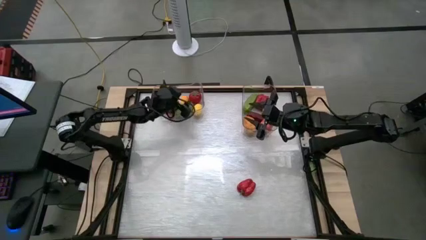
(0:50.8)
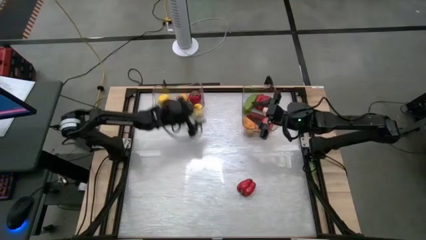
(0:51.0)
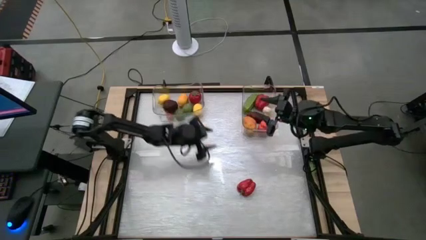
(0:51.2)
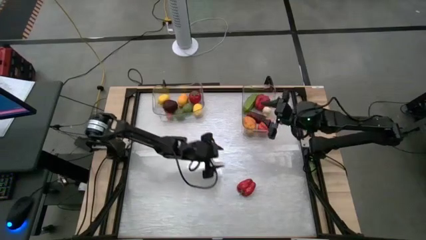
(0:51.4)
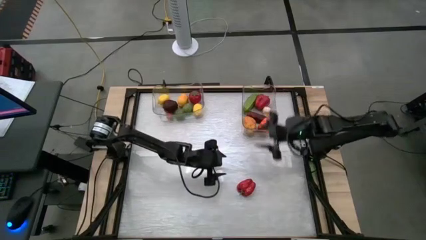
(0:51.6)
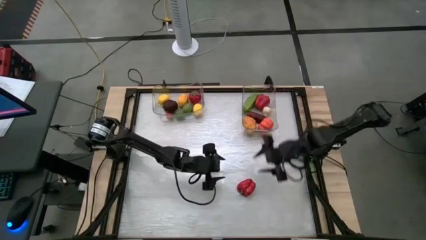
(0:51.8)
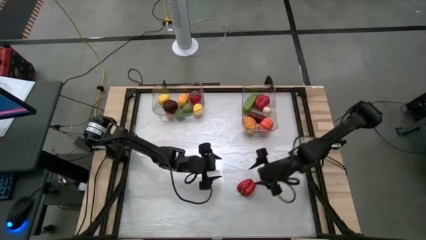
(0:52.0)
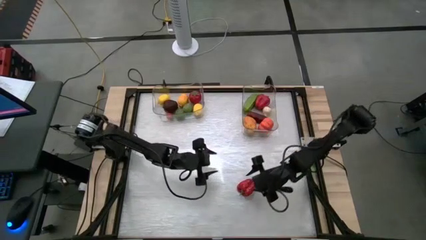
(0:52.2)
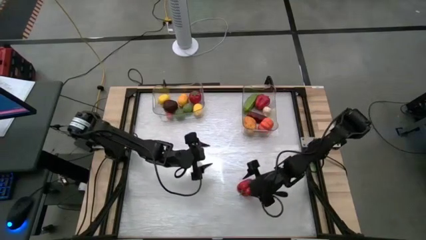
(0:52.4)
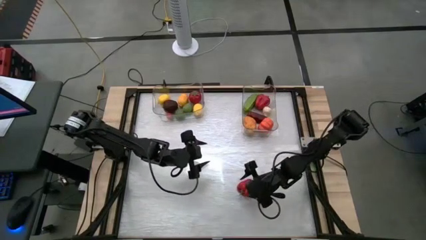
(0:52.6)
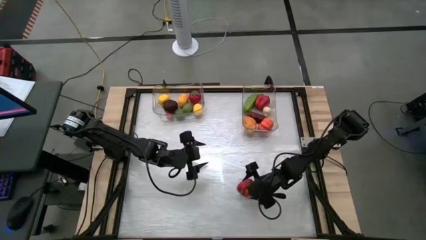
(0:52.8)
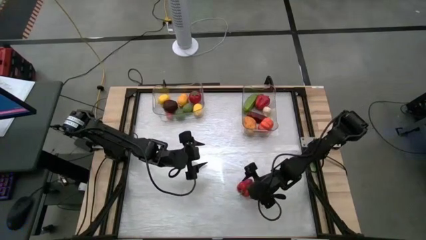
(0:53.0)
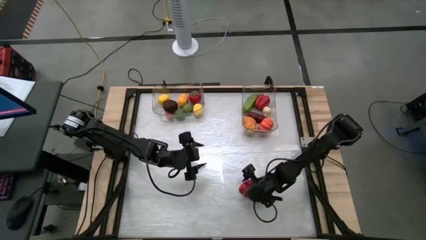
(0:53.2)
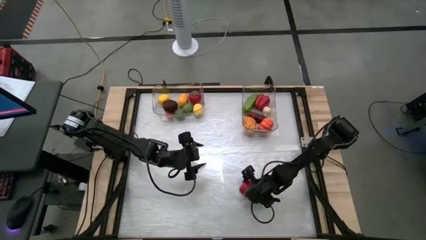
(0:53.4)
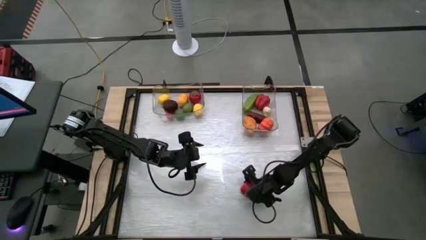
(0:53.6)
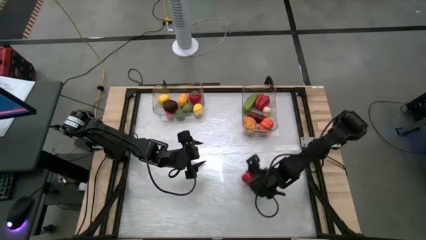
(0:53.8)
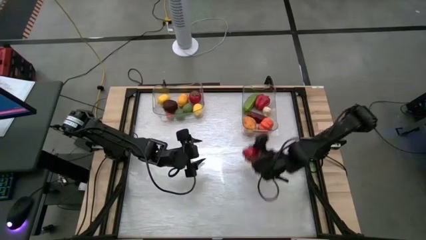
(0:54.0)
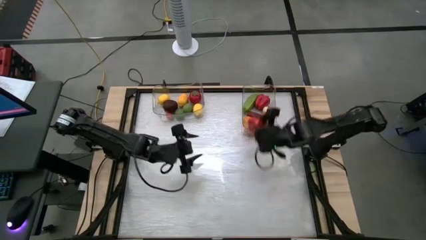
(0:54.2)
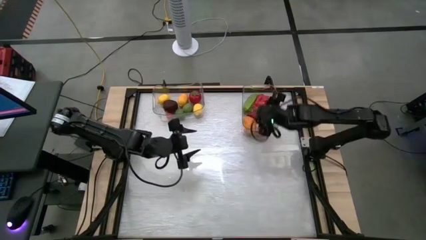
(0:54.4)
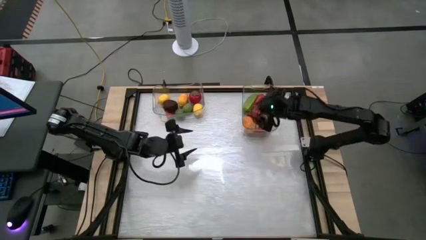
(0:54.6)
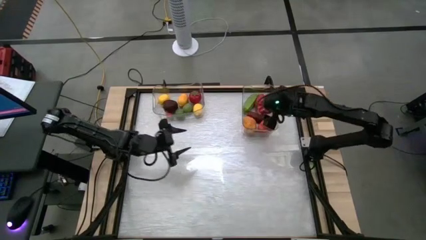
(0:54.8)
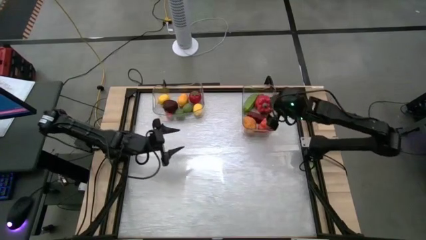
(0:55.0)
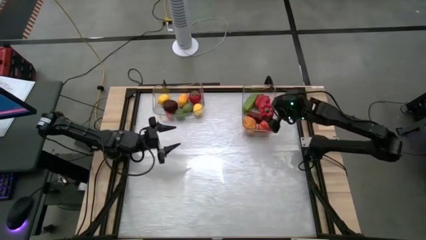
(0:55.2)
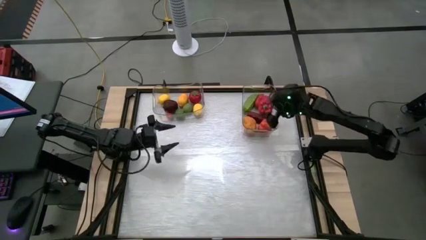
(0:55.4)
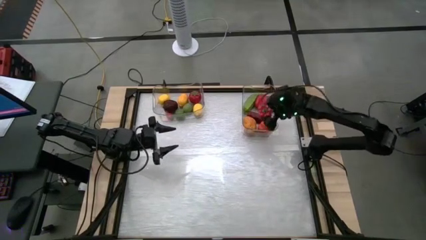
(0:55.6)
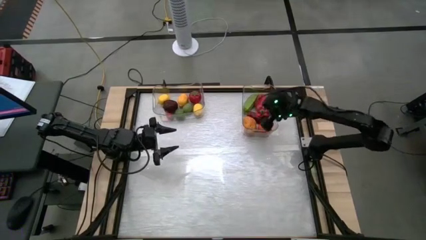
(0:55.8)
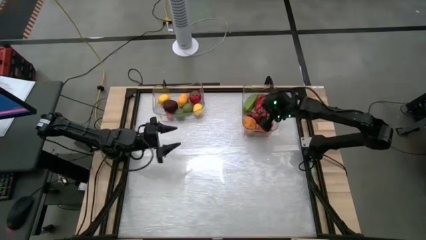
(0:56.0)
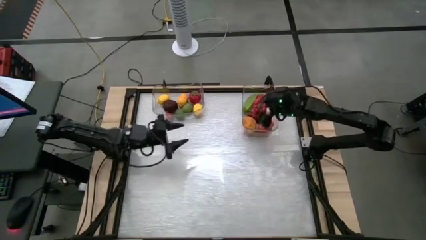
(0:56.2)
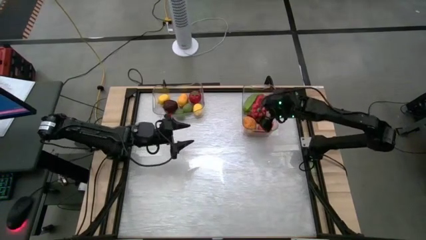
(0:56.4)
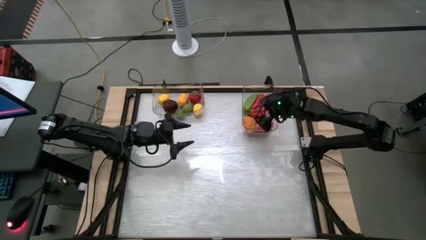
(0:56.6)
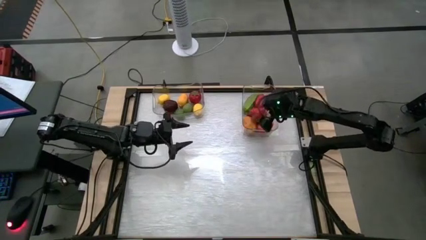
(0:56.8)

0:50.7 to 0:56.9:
Task: Sort produce into baskets
Put the red bell pepper into the right transparent bin

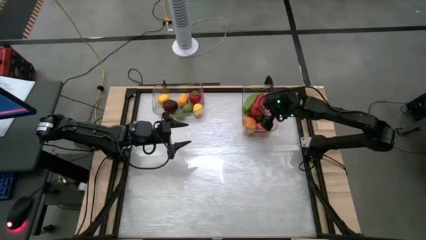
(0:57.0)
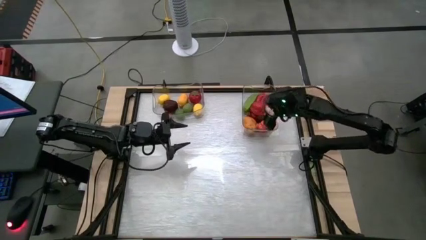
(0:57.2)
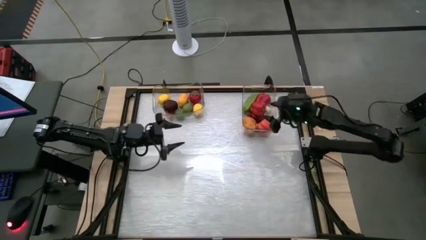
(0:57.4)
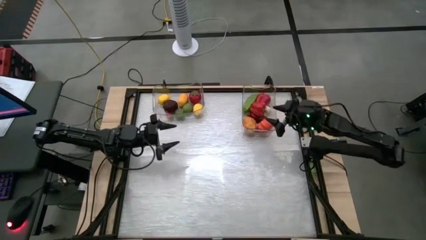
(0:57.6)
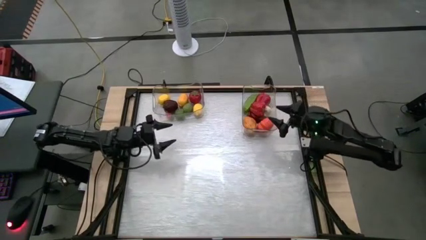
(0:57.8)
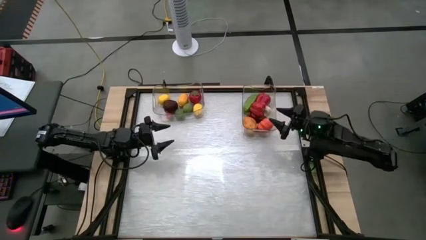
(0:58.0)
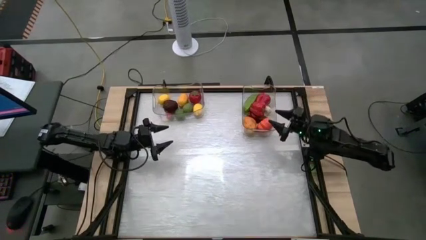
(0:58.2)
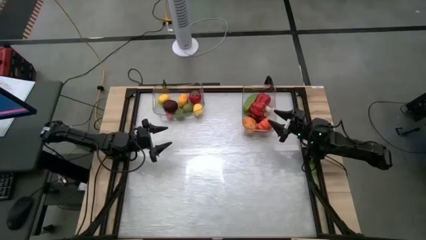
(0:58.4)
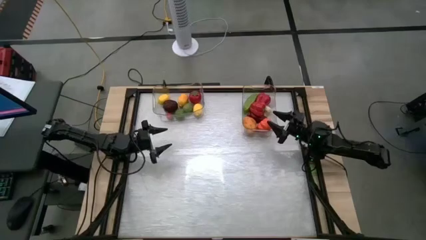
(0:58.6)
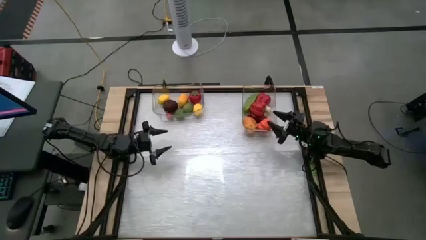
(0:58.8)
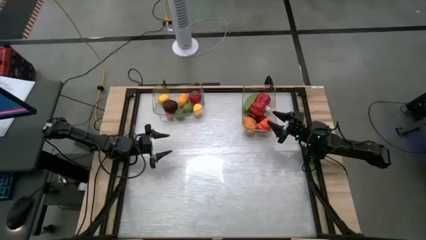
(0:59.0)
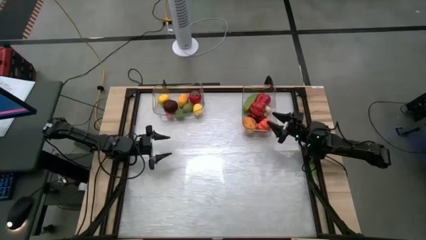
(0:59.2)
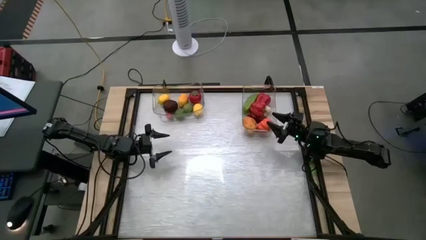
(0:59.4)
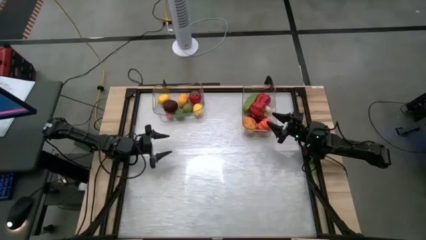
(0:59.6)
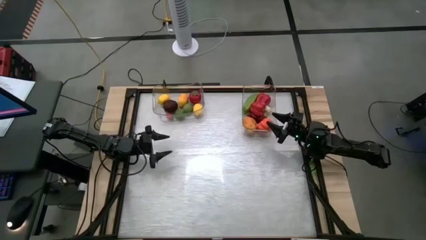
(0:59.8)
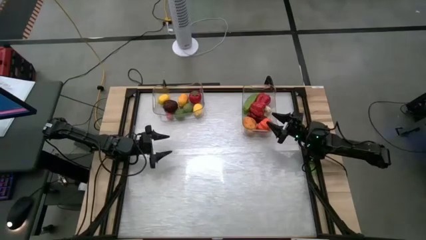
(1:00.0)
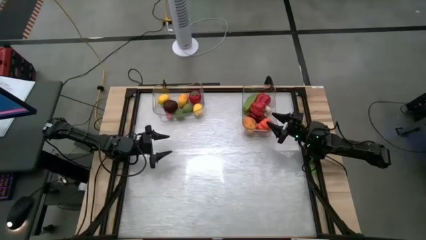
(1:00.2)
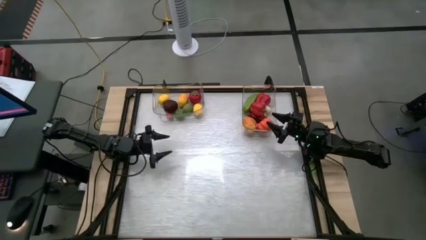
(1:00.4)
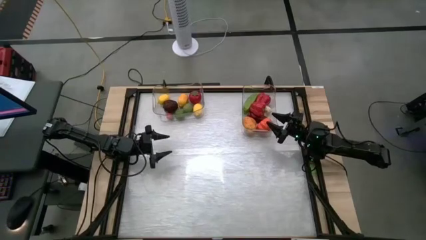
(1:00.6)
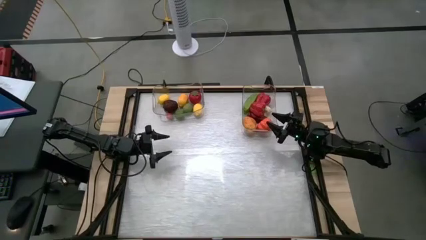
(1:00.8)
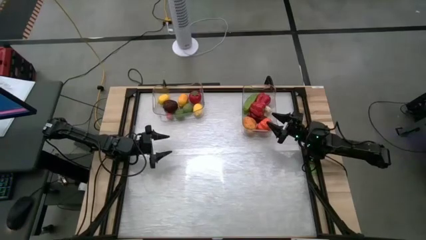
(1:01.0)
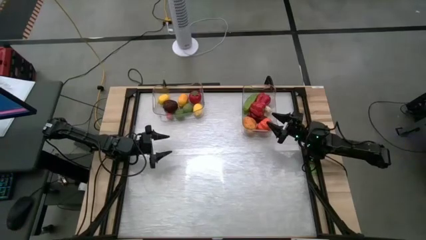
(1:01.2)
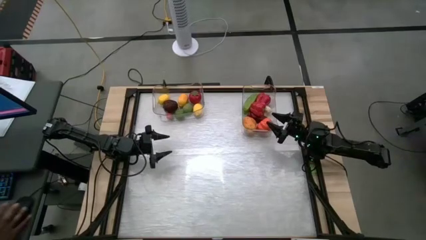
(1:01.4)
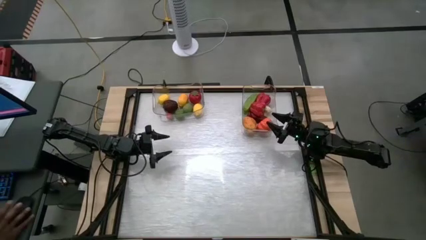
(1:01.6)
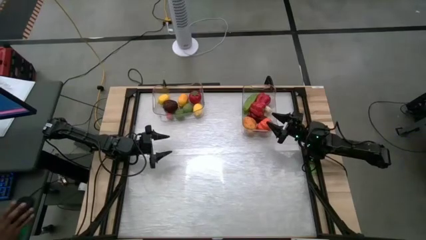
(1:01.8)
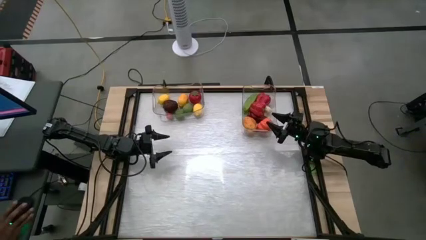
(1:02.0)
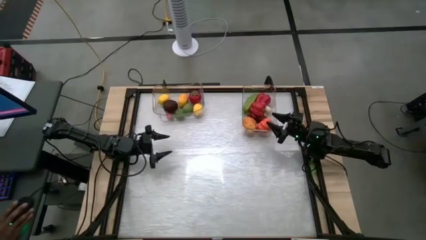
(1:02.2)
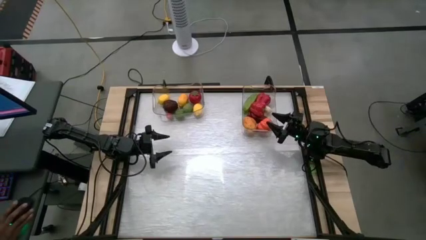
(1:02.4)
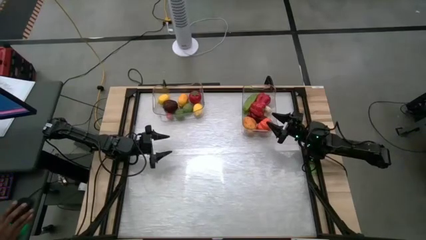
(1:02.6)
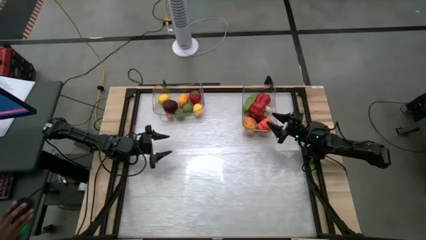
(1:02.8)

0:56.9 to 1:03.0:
Return to Home Position

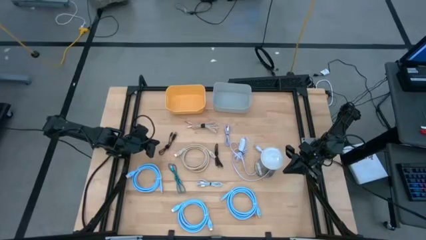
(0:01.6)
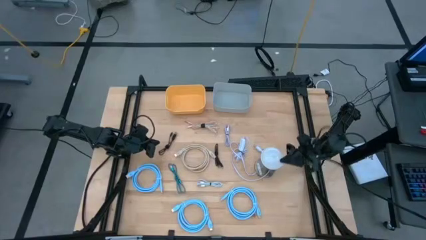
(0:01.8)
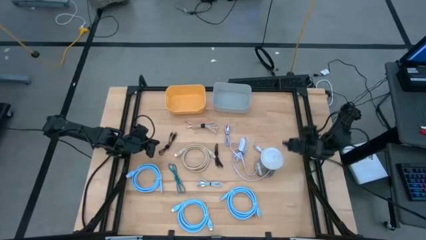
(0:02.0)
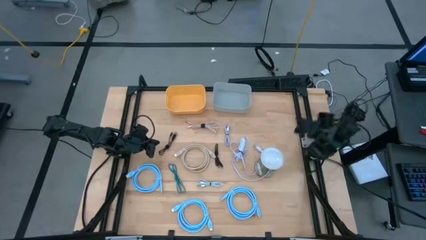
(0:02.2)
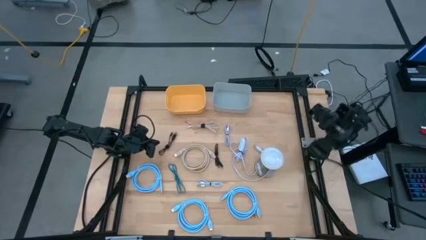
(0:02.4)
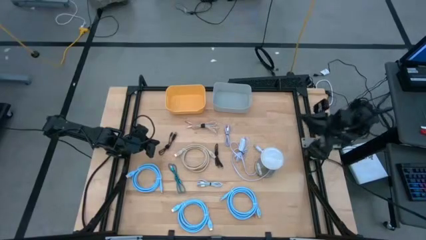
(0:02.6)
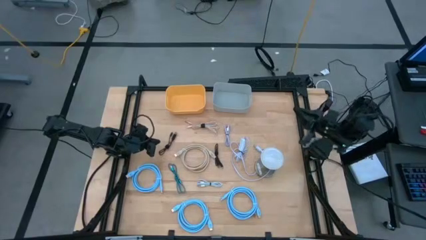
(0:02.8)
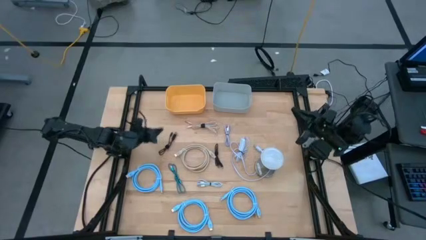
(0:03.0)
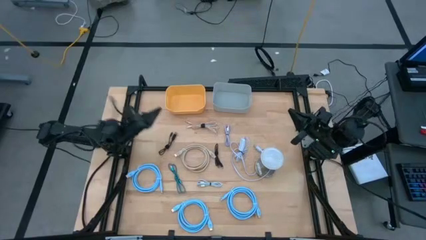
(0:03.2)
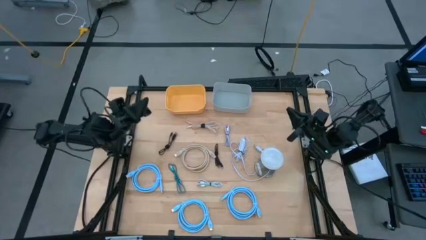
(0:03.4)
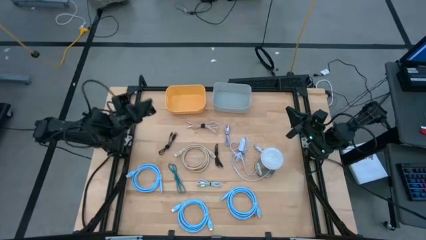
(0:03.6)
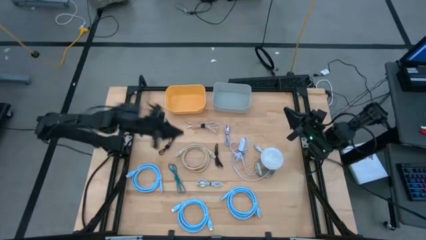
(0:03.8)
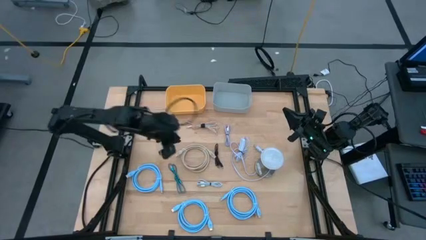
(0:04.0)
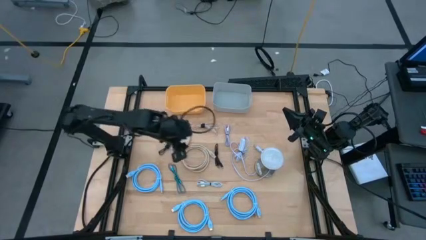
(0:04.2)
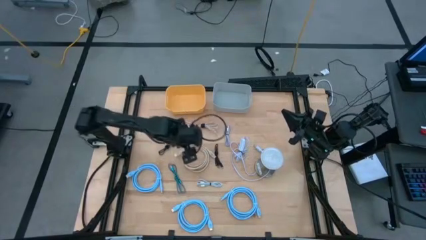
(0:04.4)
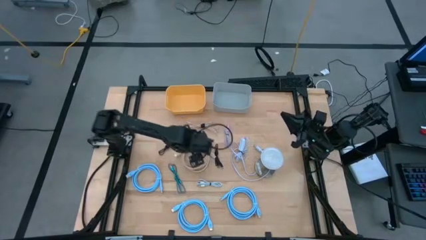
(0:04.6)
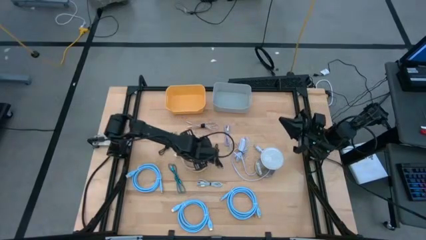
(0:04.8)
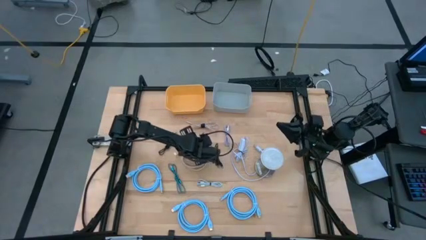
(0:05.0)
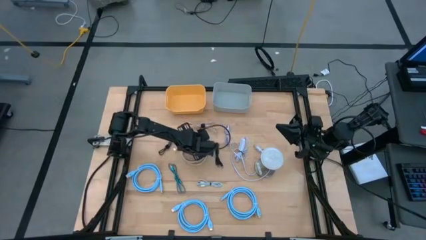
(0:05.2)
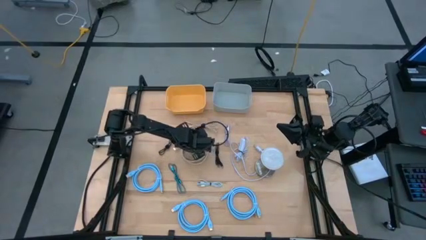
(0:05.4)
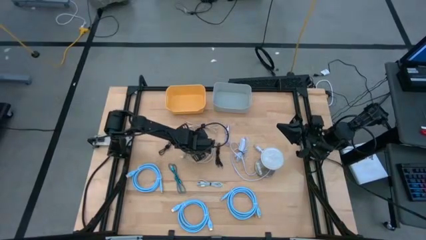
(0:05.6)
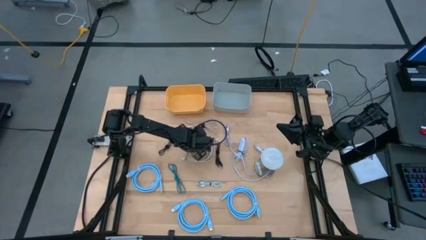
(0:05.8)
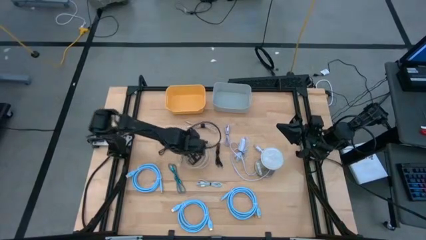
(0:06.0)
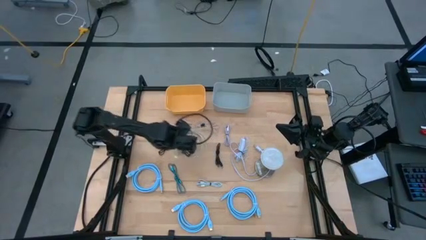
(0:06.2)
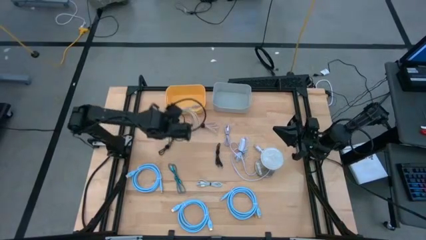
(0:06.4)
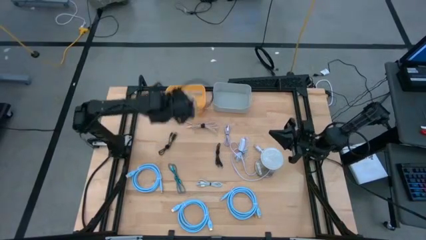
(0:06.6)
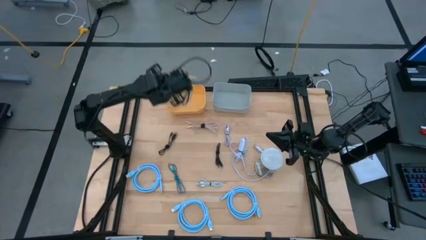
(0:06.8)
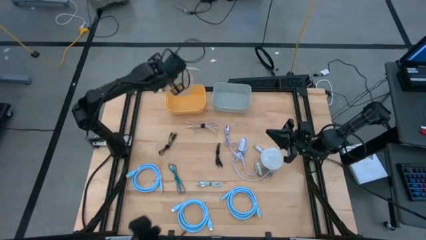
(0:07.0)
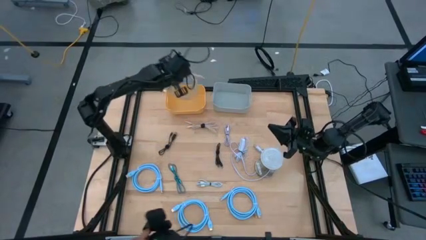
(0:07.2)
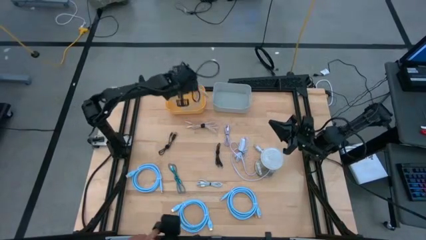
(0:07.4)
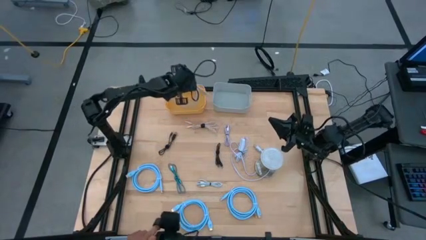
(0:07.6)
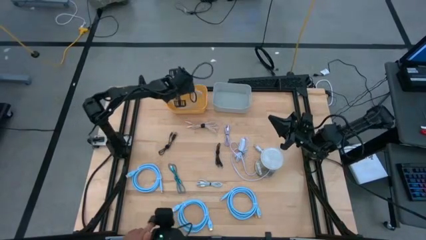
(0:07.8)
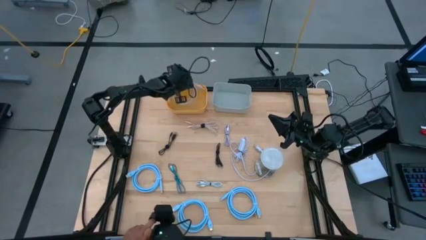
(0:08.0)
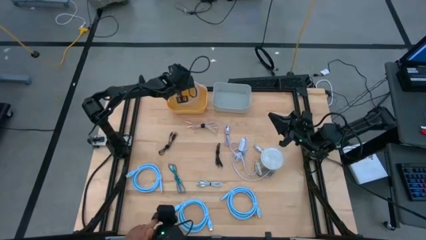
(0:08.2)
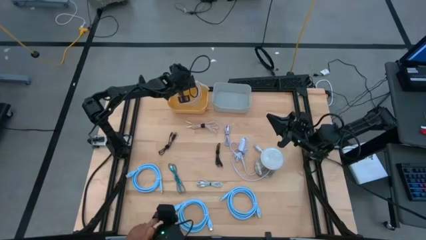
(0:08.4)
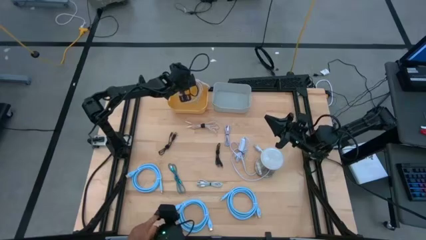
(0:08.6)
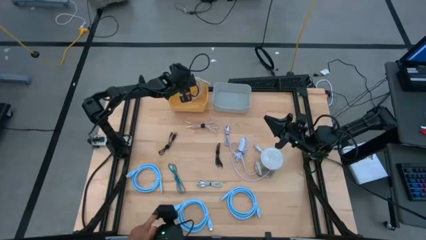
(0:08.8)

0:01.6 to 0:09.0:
Task: Pick & Place USB Port
Put the brown HDMI cable into the yellow bin
